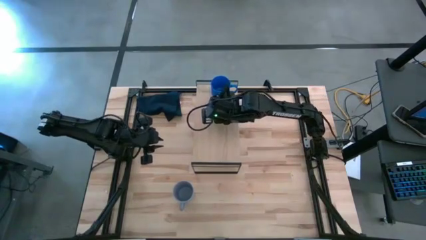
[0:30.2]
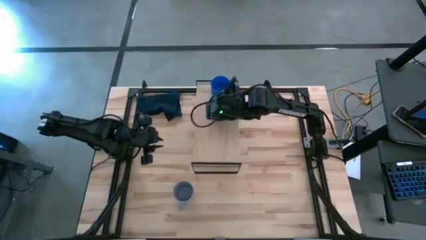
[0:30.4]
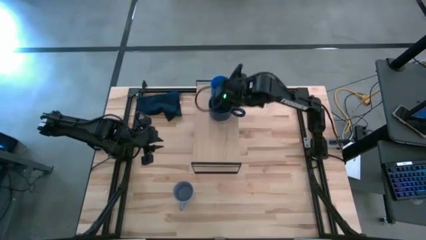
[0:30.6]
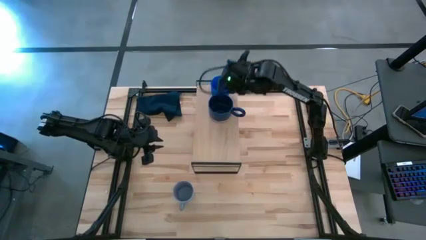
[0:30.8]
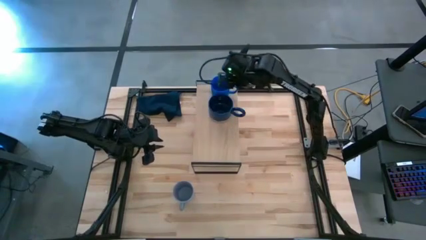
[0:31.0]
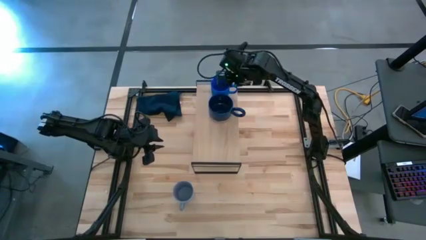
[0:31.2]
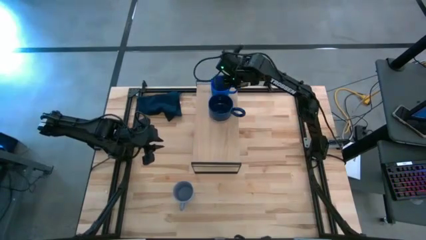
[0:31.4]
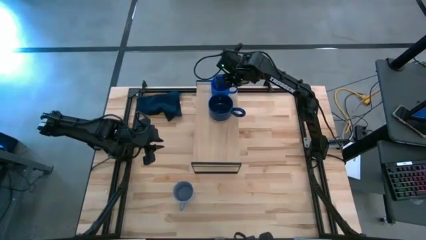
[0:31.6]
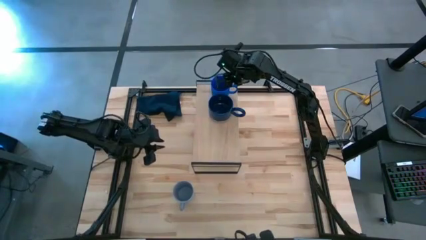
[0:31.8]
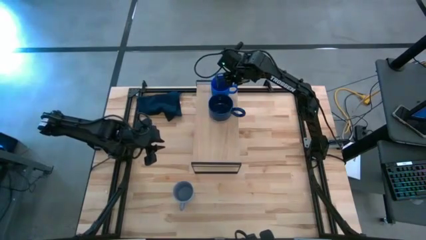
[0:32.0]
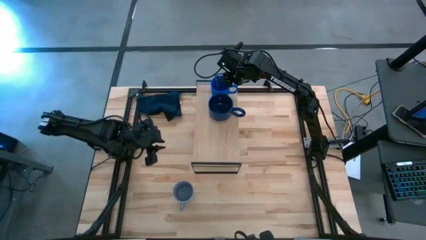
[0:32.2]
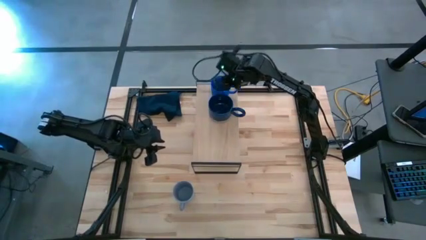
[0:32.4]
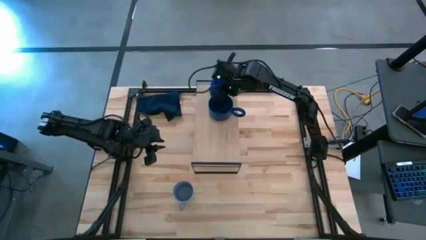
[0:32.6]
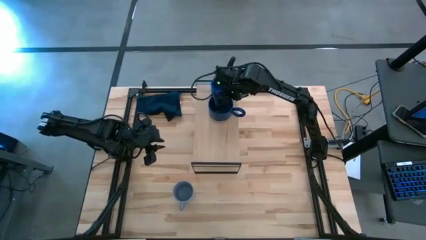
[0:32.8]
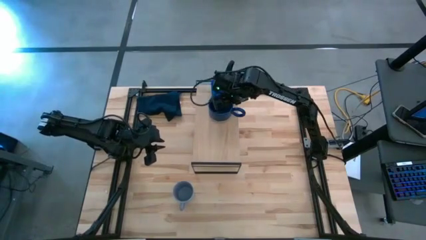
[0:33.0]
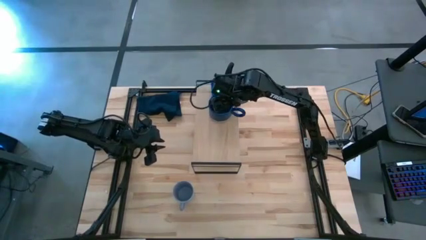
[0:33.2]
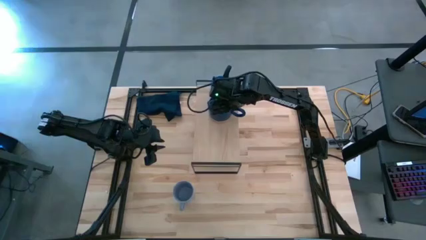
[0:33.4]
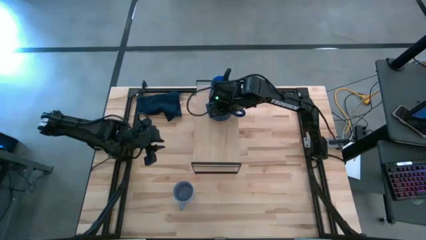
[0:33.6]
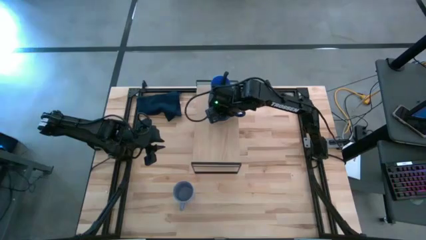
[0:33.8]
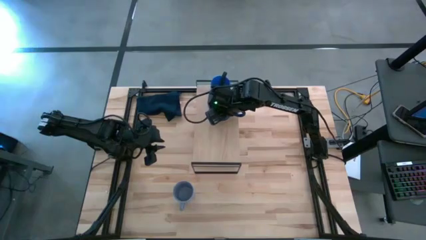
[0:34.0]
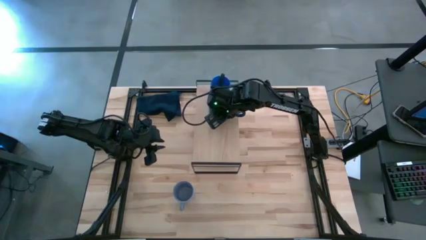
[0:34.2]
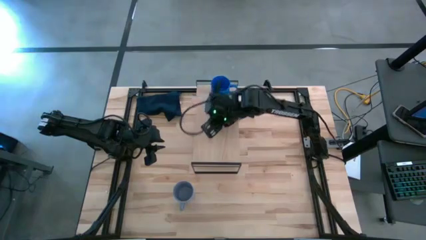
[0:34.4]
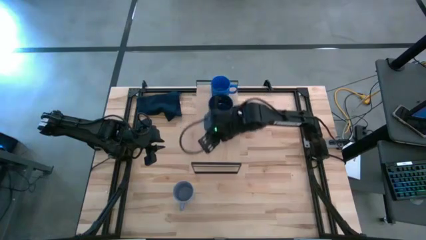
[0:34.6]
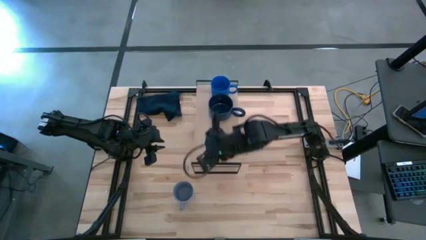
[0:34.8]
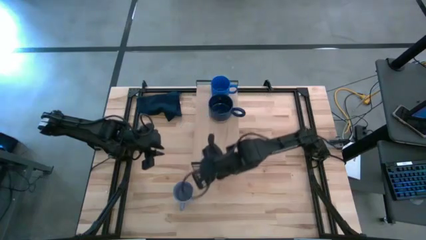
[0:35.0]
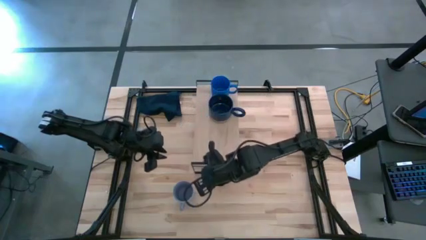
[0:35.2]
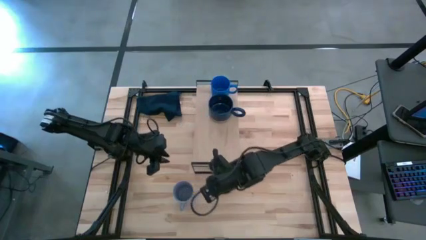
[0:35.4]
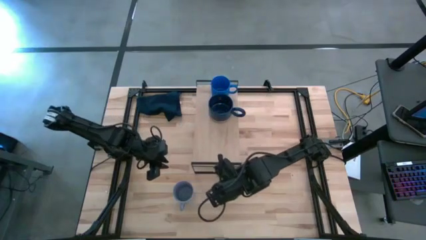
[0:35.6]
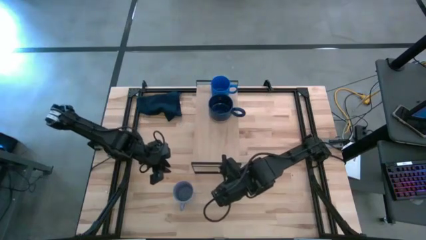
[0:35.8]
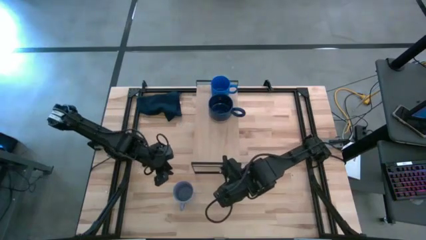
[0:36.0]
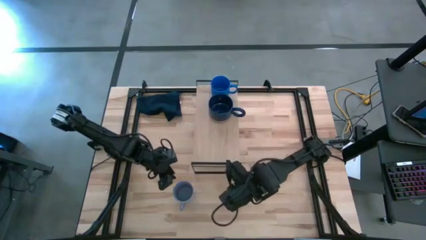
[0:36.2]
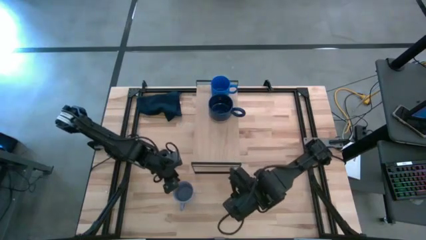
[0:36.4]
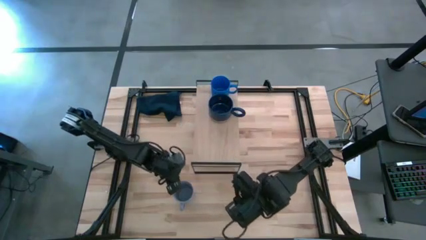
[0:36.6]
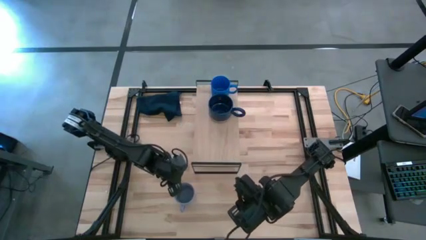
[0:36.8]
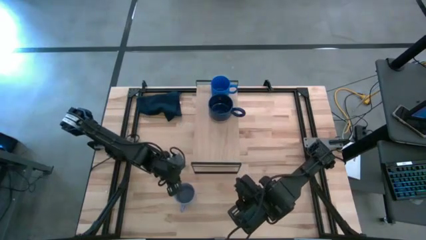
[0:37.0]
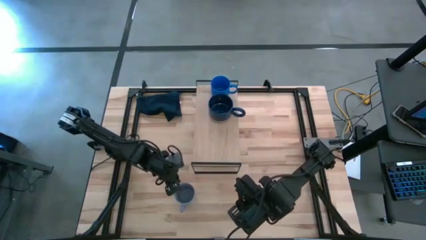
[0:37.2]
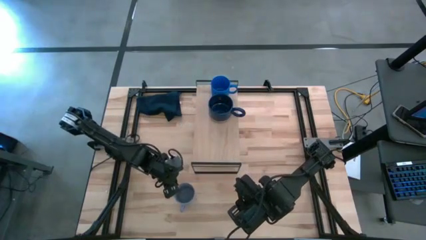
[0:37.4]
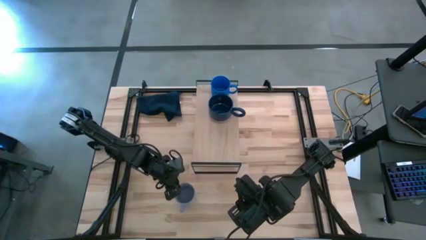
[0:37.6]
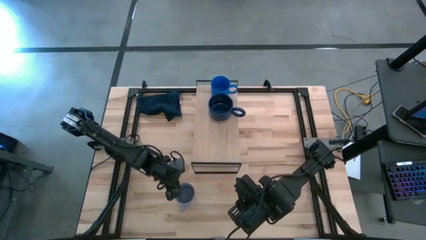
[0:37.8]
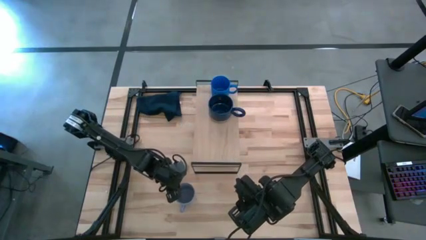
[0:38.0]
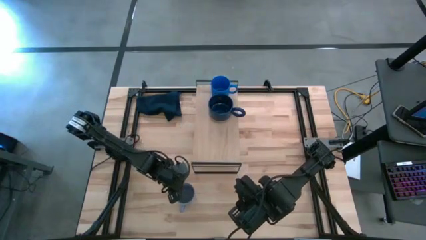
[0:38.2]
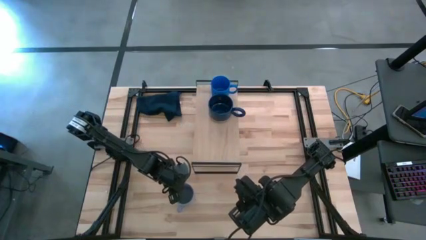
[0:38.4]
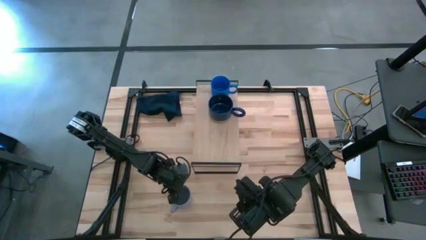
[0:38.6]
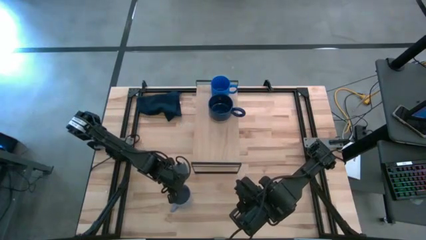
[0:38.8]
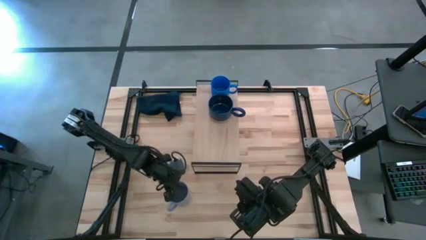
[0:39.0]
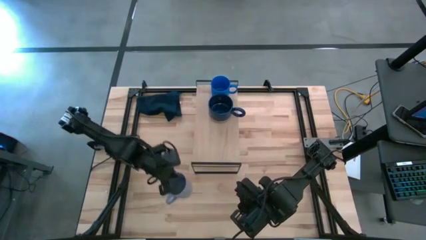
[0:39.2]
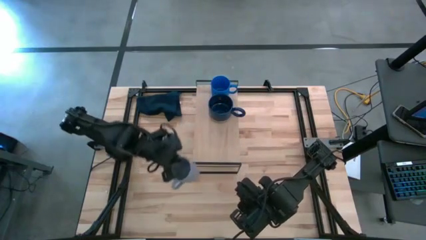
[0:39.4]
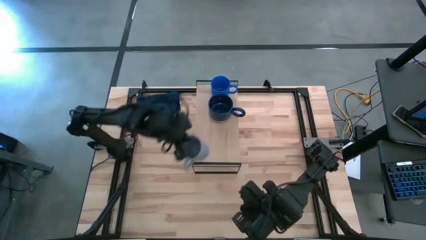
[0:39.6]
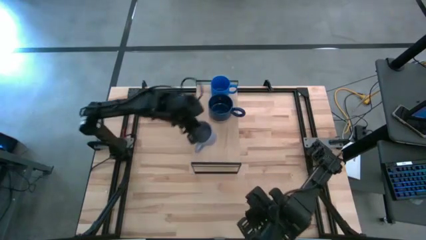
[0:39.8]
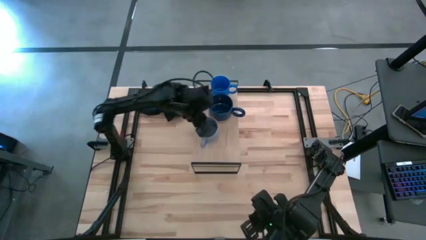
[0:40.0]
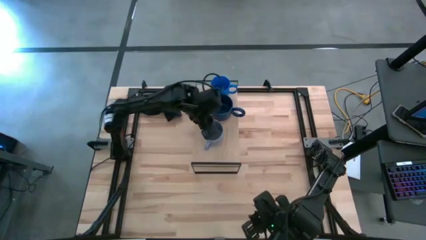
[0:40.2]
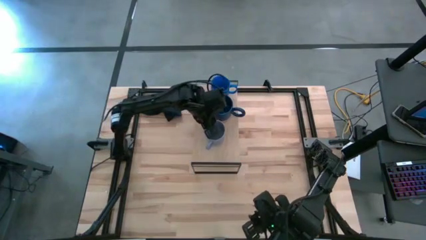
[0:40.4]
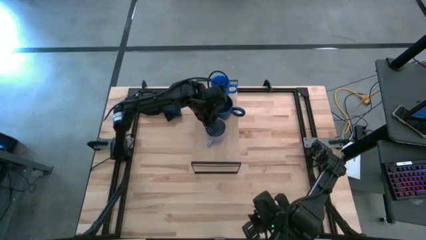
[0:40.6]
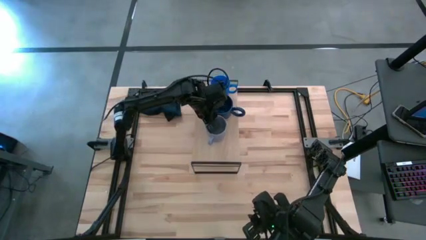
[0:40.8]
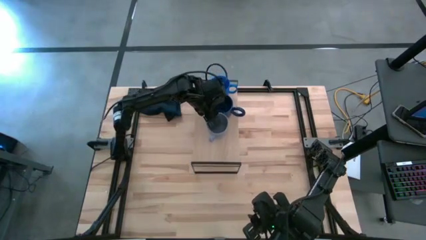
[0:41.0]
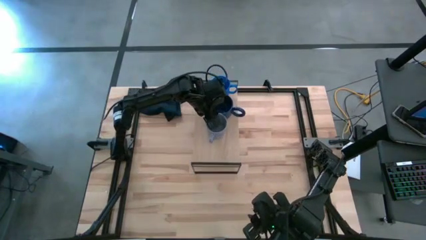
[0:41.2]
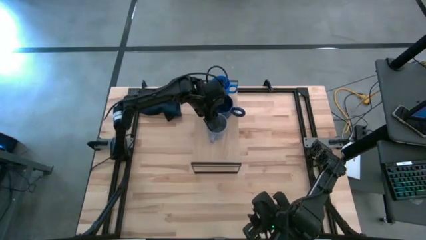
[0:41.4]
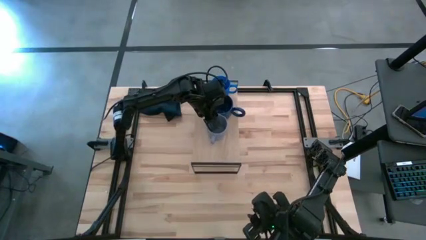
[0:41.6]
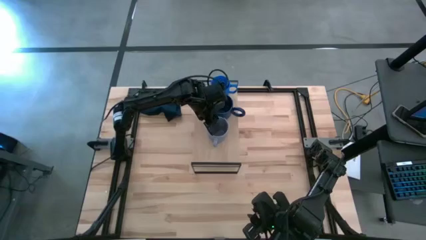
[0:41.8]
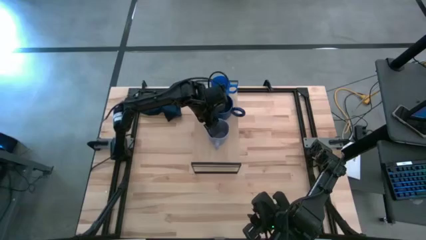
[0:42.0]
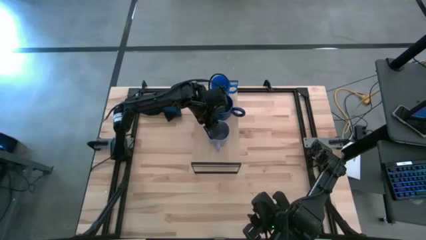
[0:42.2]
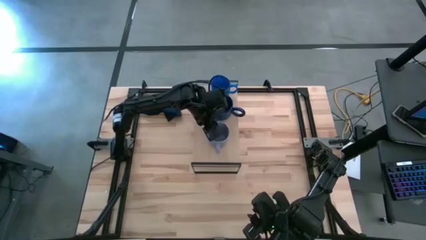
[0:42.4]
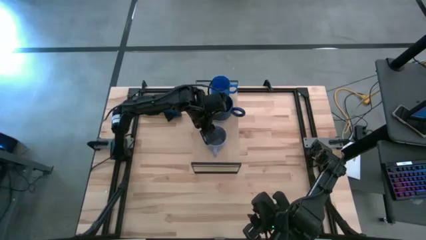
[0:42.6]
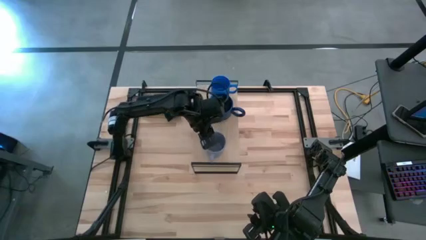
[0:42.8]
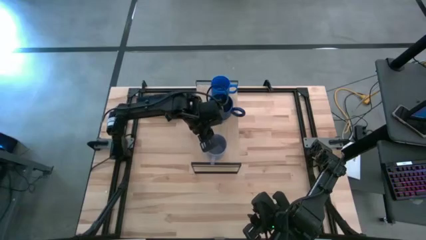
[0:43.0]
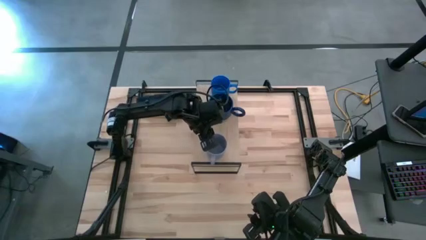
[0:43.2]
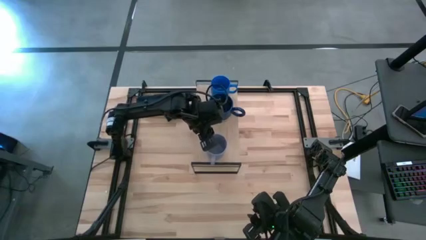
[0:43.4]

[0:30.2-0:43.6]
Task: Stack small to large cups/mugs on shelf
Put the purple mug on the shelf

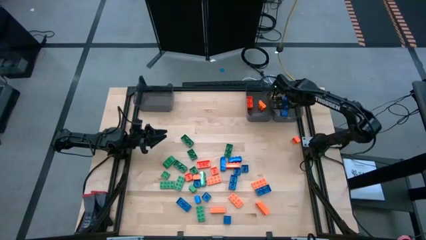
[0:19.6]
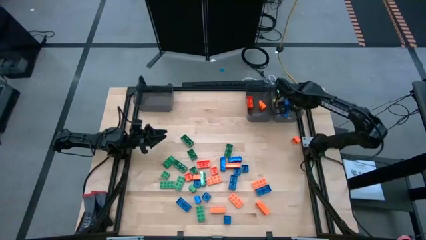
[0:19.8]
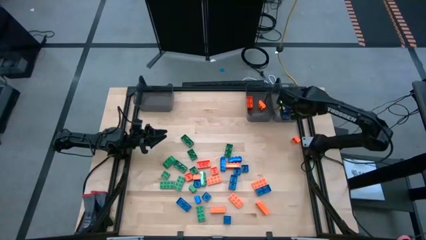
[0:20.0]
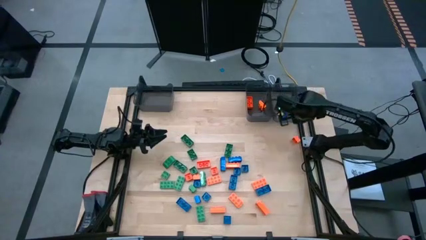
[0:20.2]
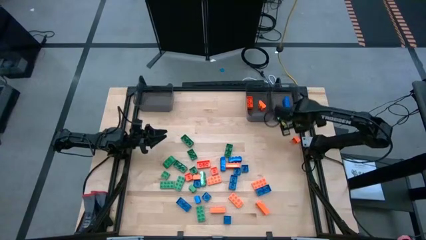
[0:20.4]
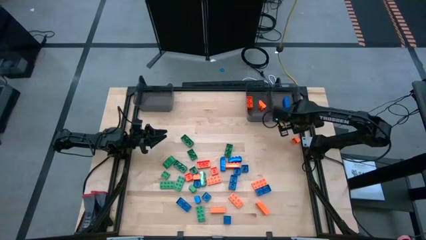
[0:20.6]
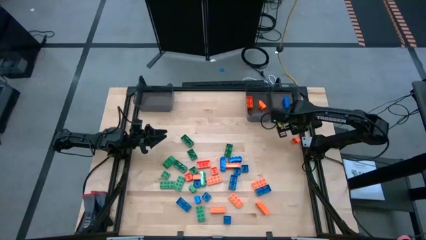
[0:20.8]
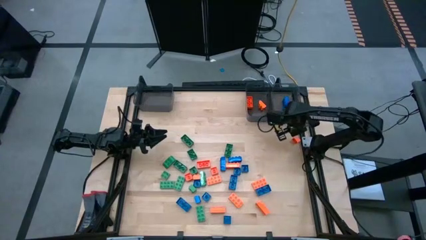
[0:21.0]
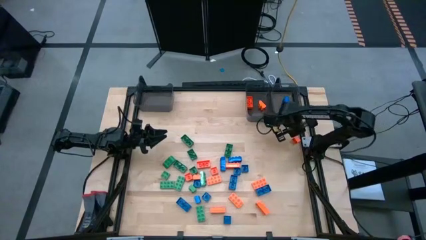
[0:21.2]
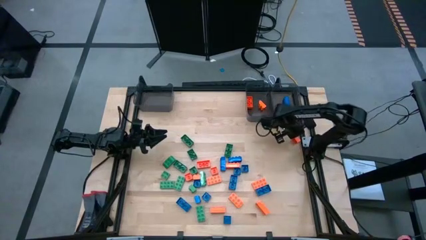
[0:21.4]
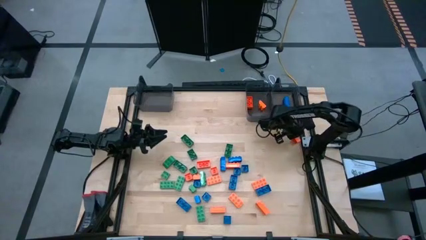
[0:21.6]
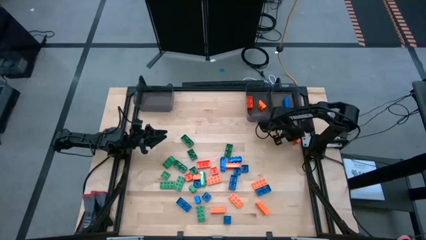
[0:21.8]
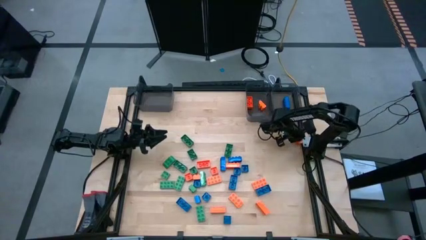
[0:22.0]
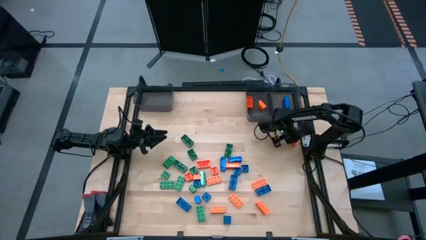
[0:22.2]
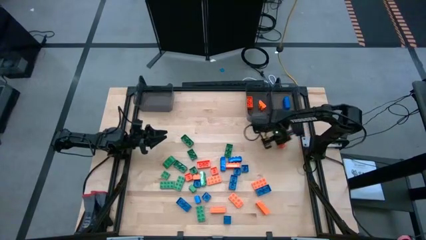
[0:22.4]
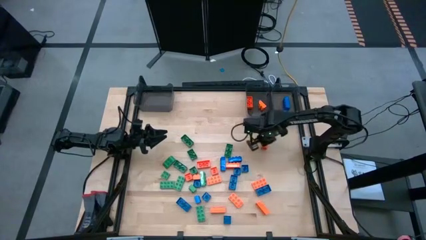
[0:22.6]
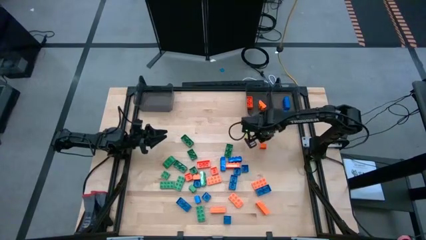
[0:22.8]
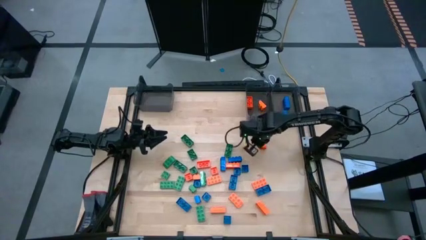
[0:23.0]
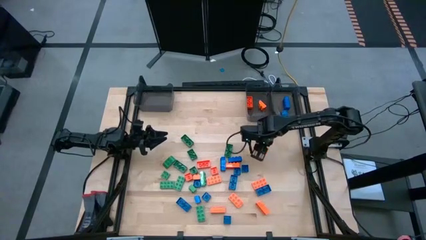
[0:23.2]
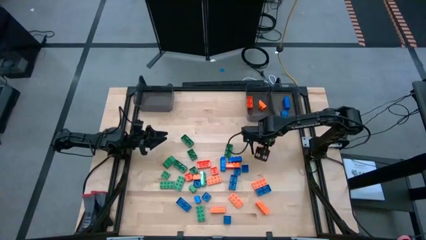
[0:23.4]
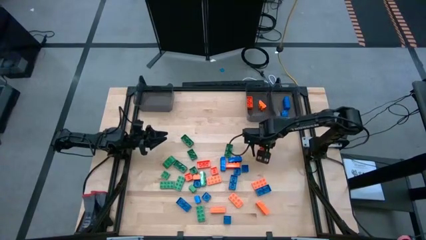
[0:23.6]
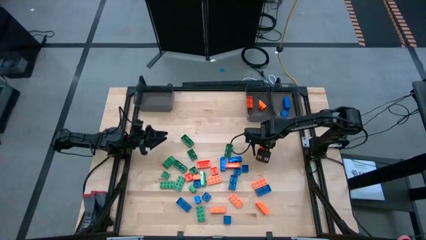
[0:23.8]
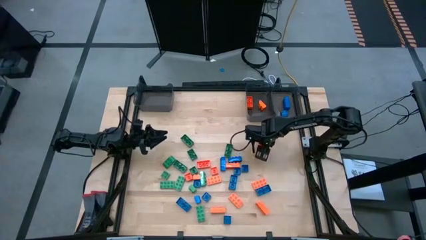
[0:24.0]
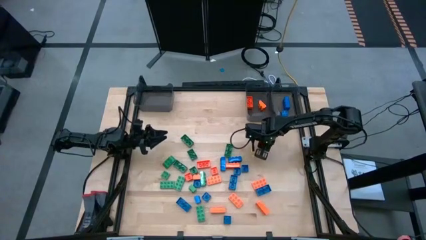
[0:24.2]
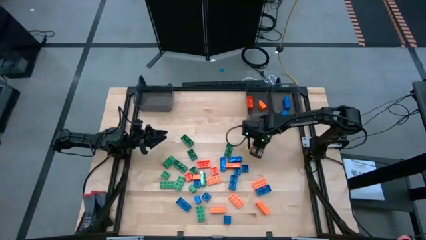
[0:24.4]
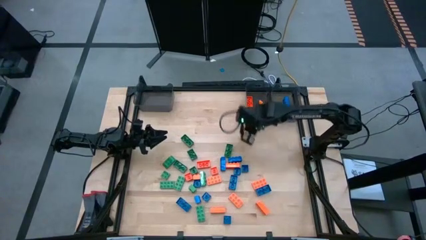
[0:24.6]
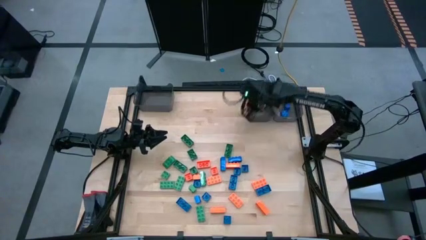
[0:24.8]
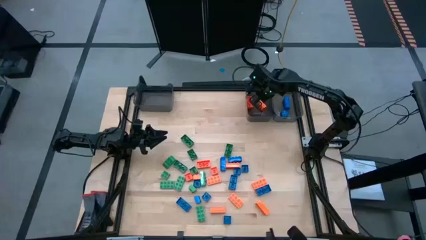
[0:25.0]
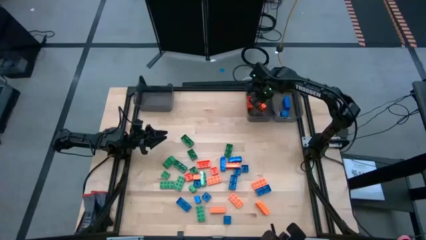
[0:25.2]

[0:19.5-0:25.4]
Task: Sort blocks
Put the orange game piece into the middle black bin
